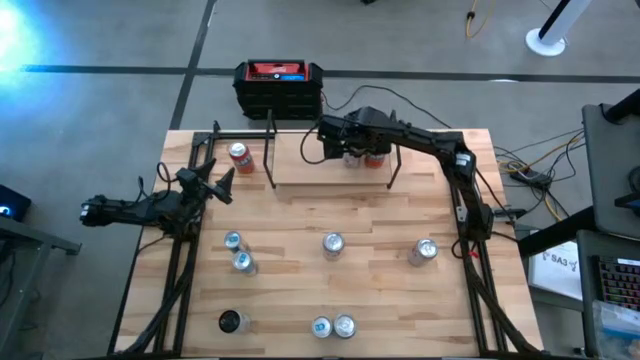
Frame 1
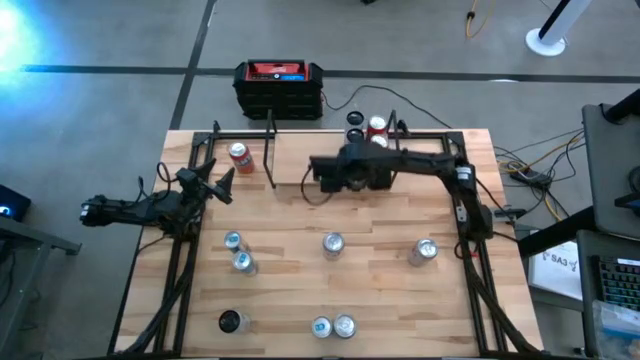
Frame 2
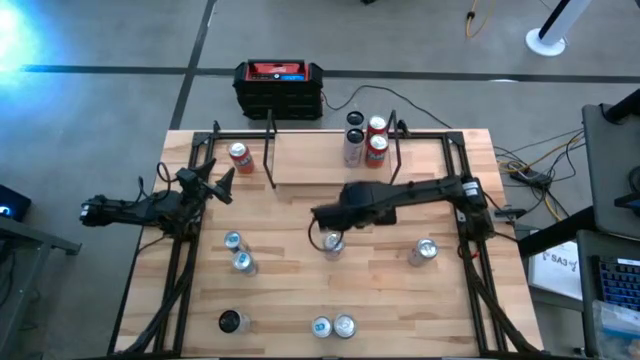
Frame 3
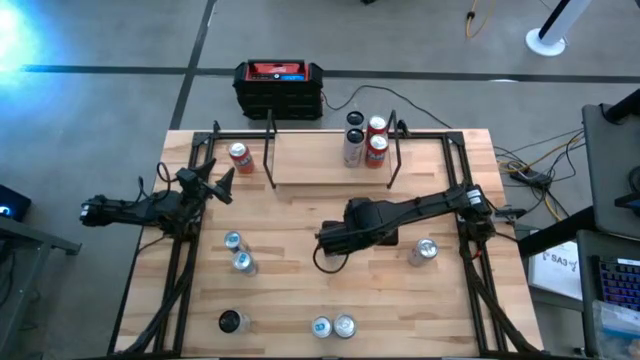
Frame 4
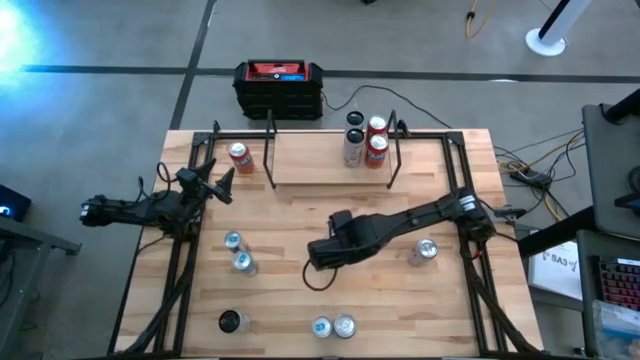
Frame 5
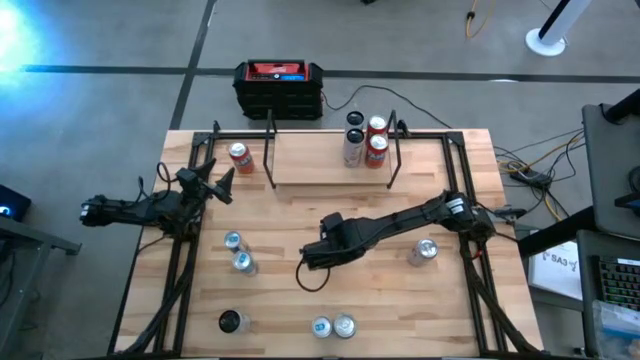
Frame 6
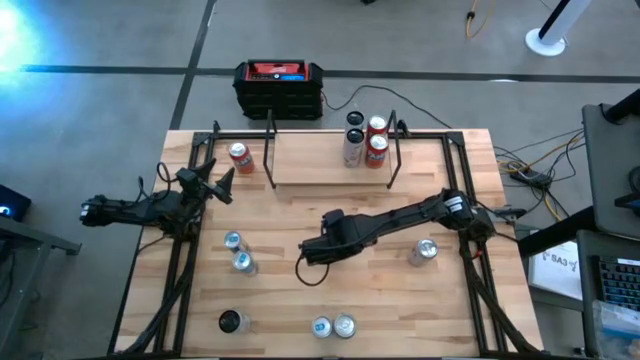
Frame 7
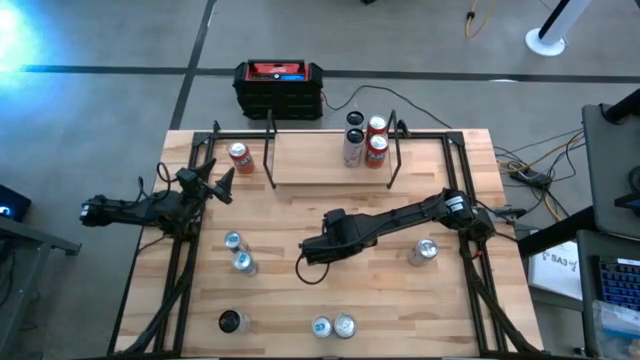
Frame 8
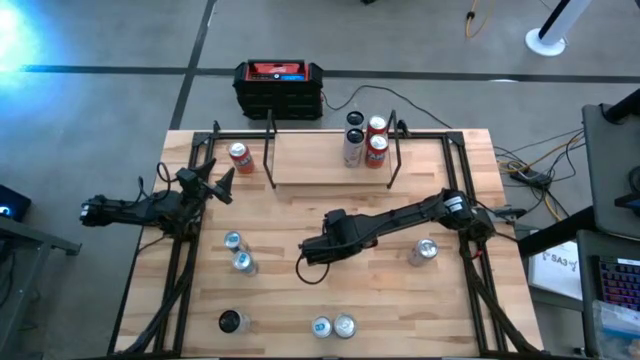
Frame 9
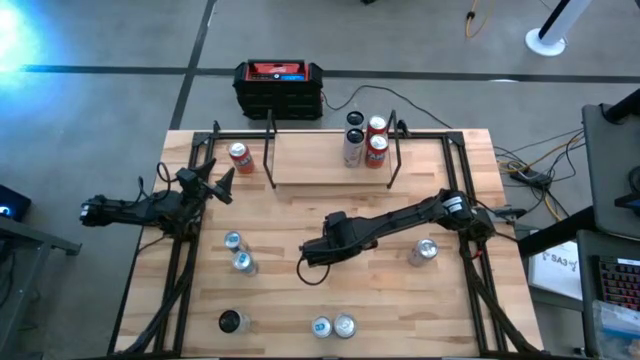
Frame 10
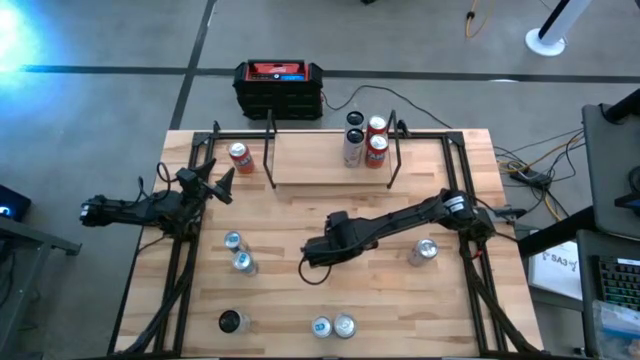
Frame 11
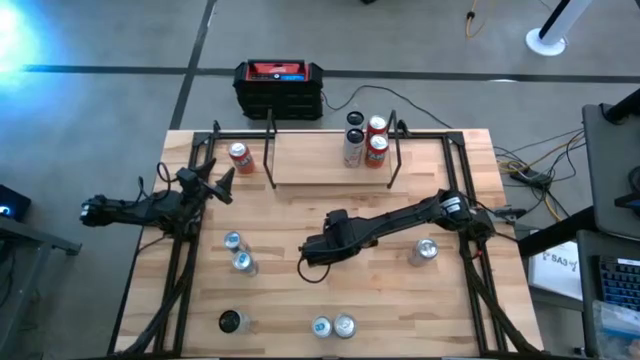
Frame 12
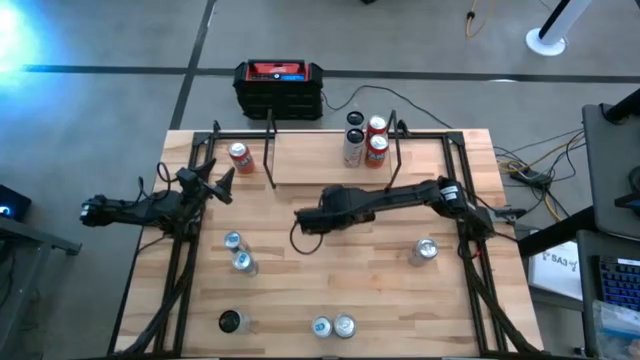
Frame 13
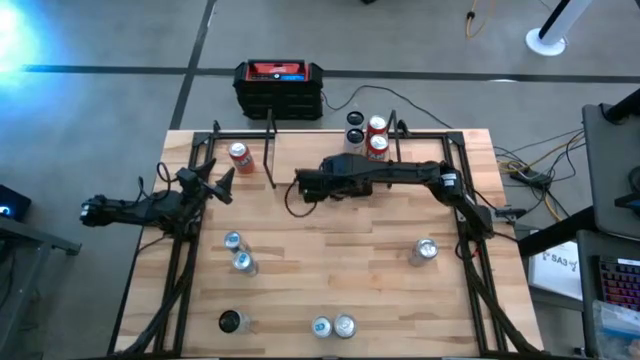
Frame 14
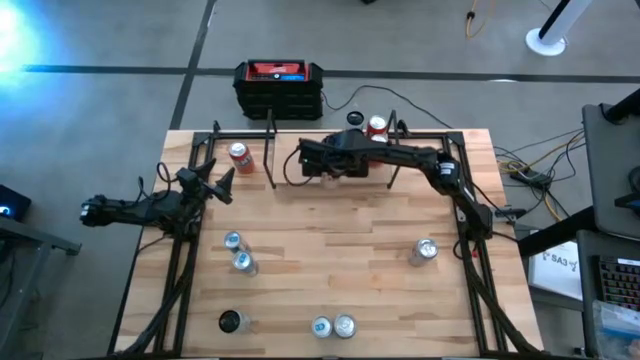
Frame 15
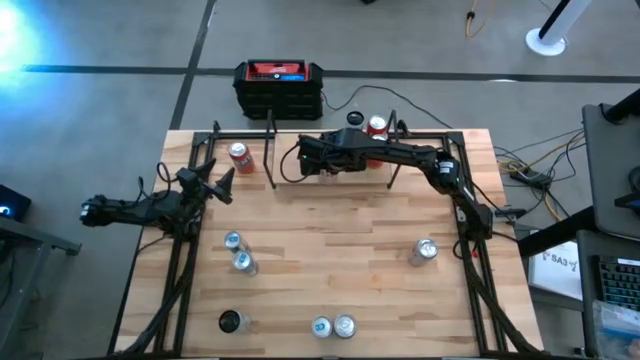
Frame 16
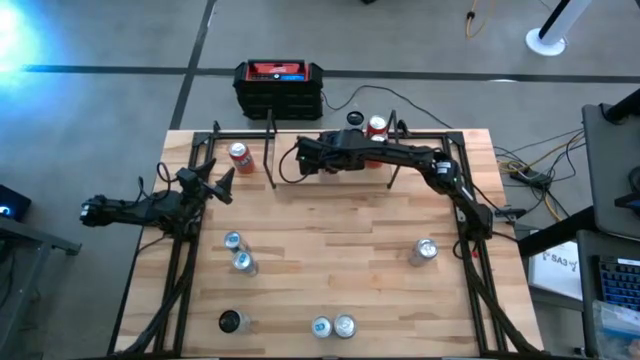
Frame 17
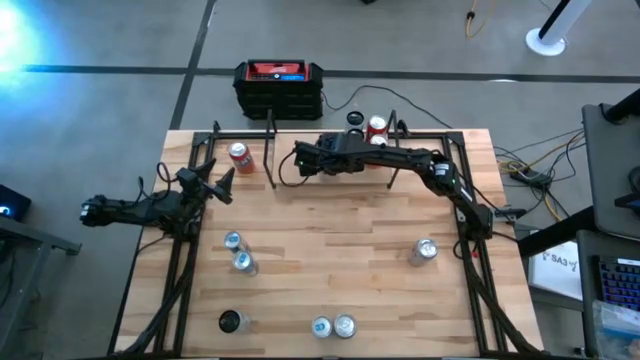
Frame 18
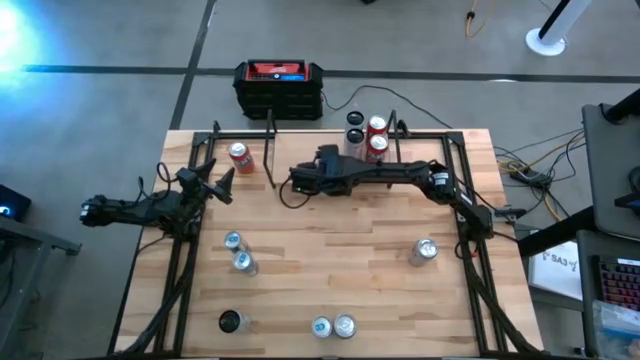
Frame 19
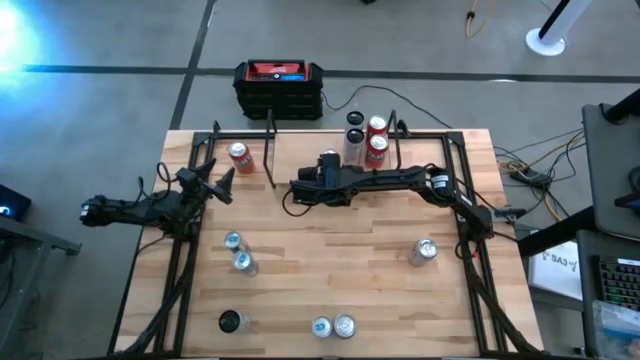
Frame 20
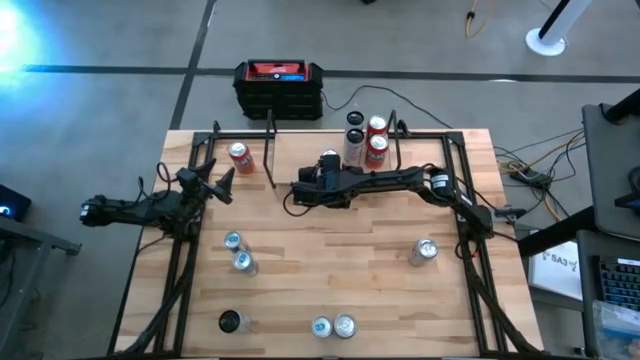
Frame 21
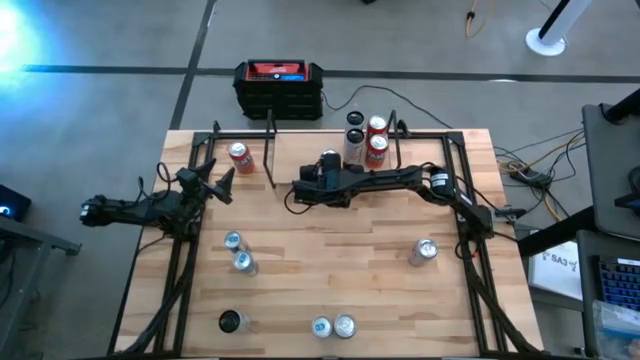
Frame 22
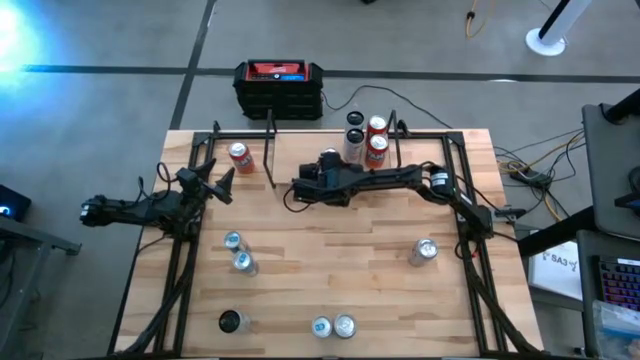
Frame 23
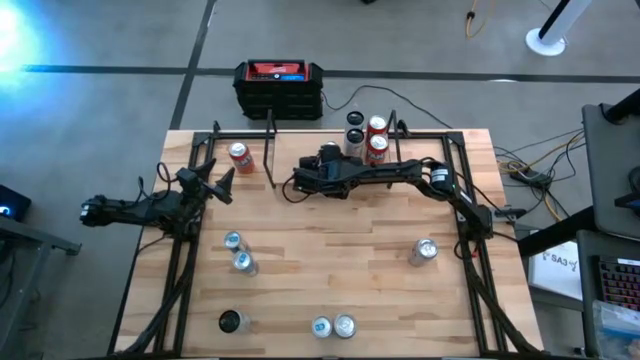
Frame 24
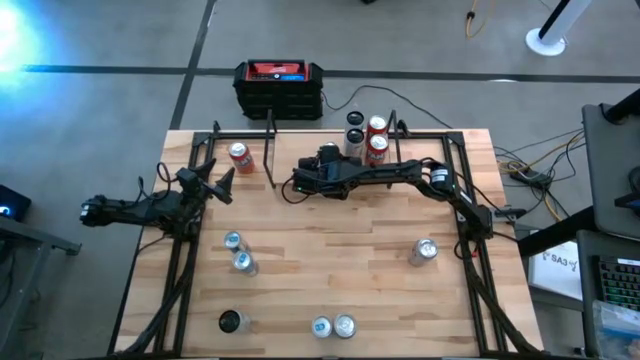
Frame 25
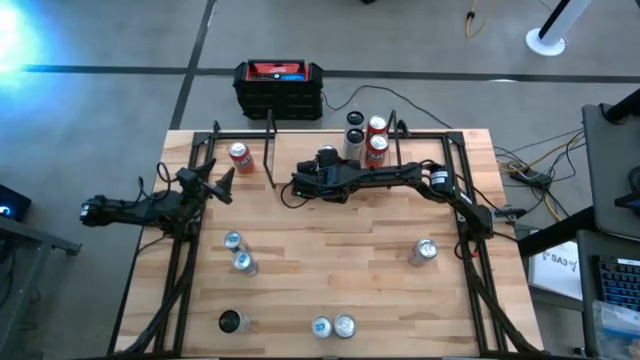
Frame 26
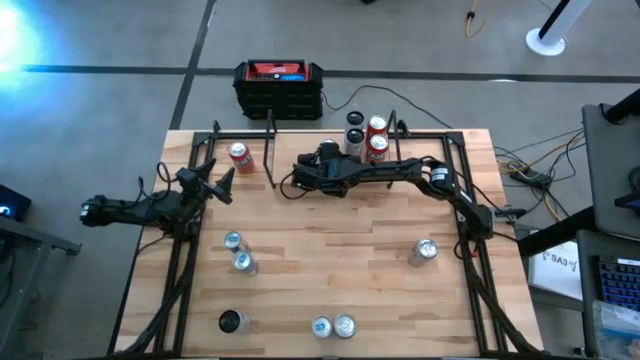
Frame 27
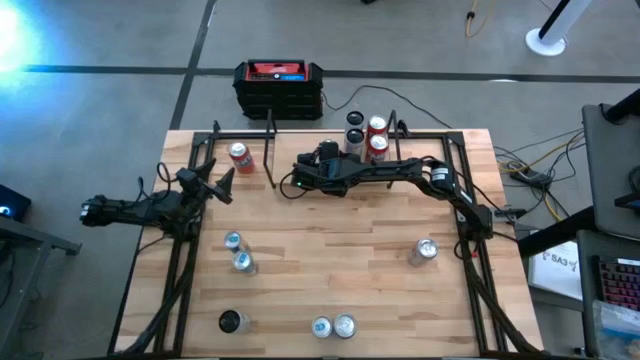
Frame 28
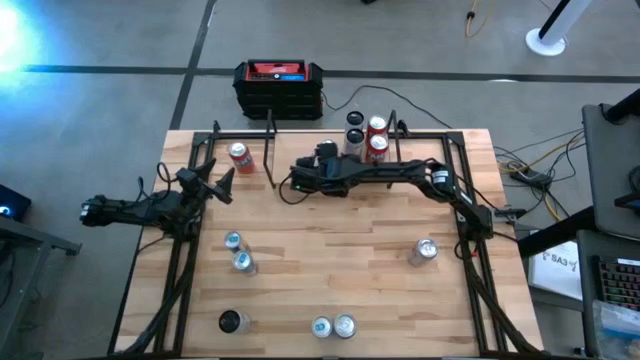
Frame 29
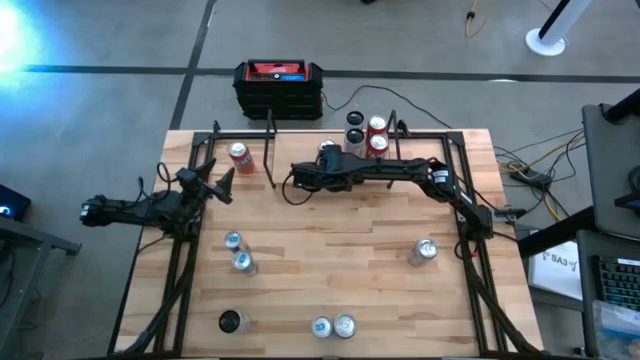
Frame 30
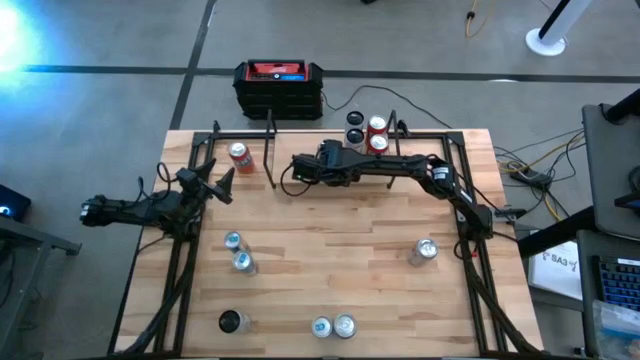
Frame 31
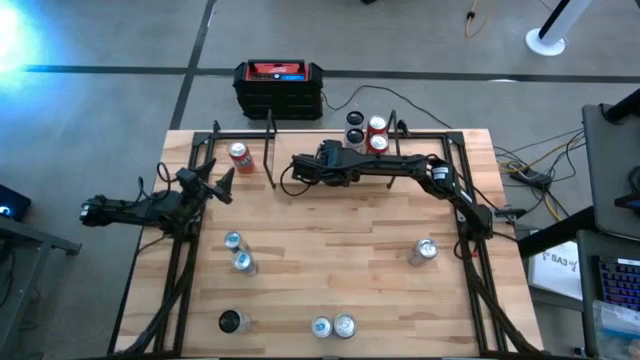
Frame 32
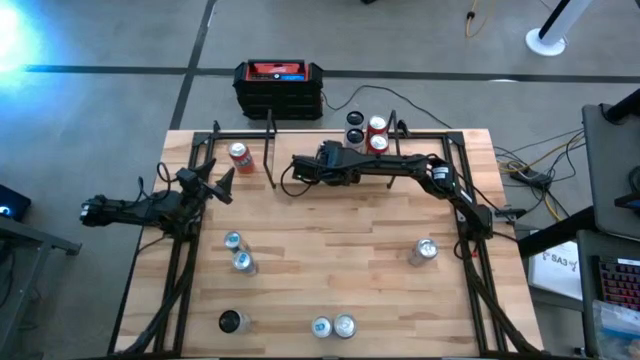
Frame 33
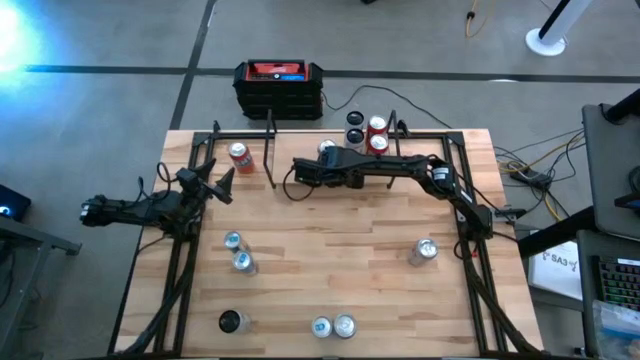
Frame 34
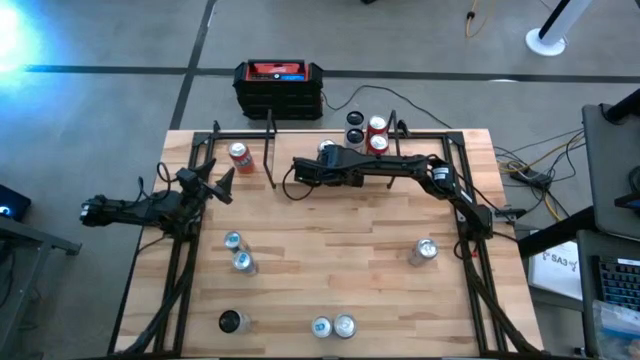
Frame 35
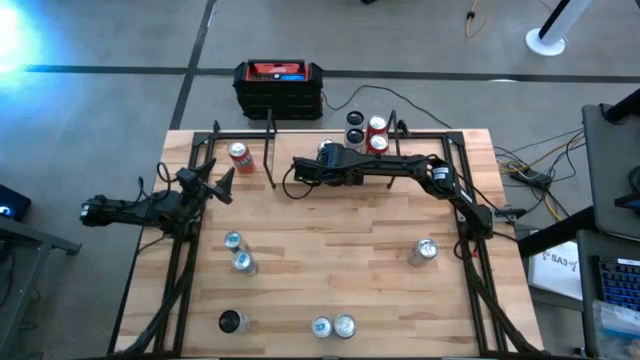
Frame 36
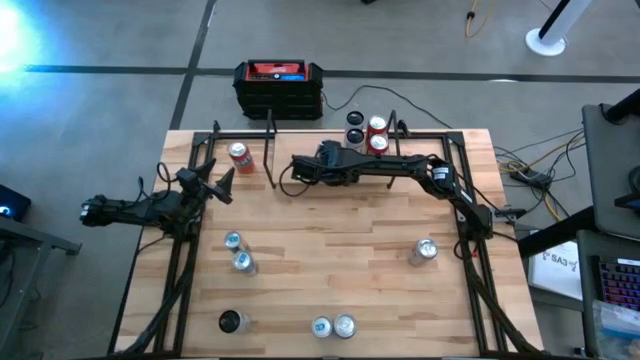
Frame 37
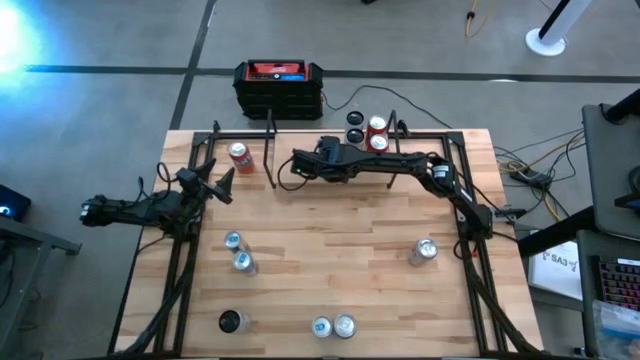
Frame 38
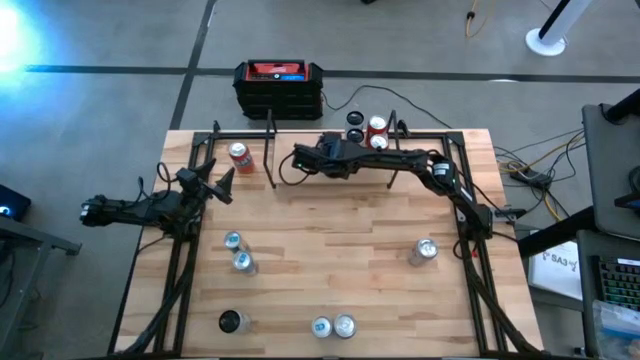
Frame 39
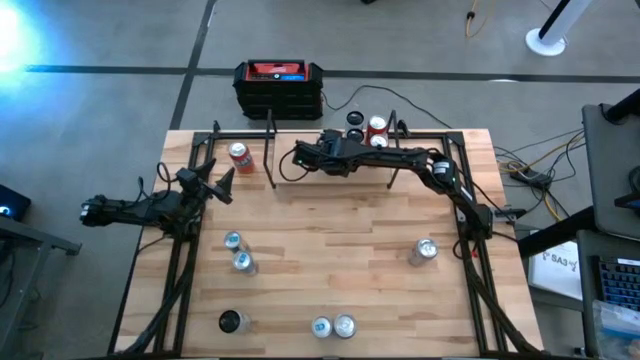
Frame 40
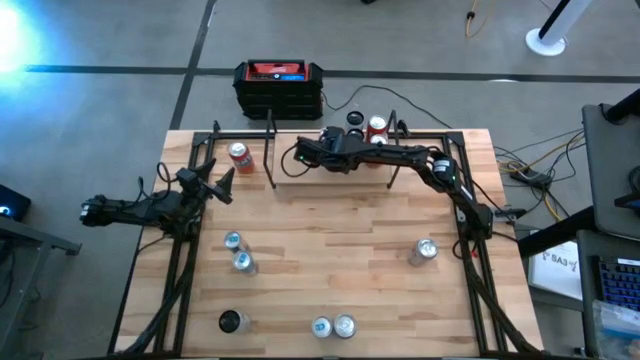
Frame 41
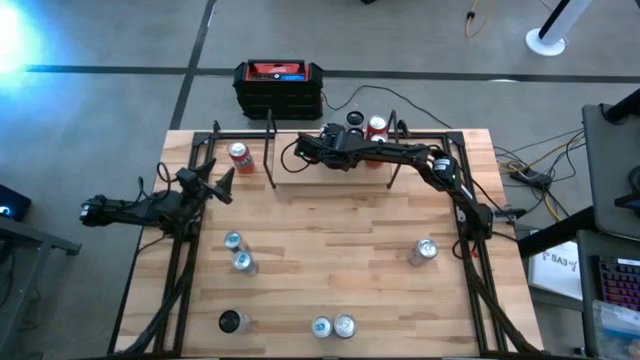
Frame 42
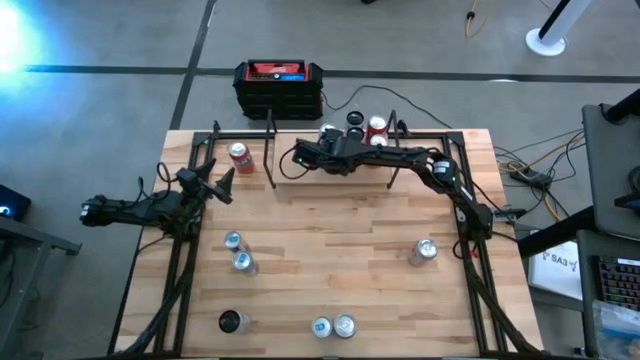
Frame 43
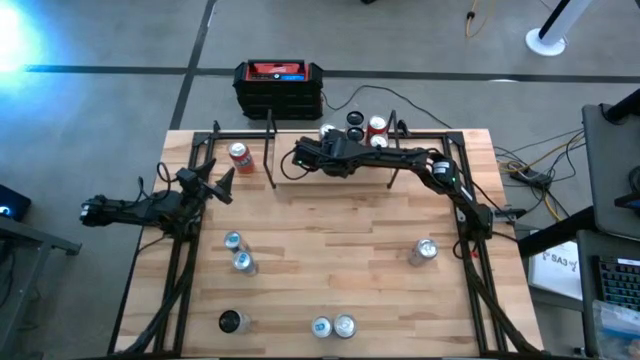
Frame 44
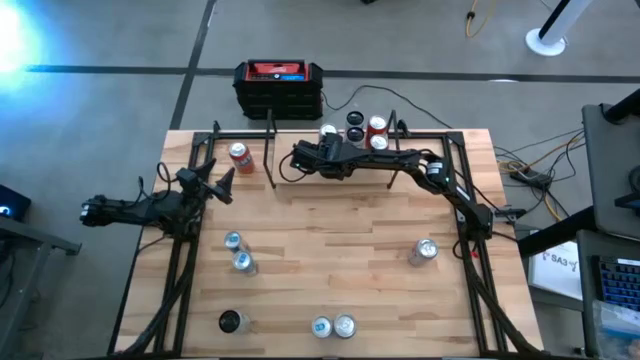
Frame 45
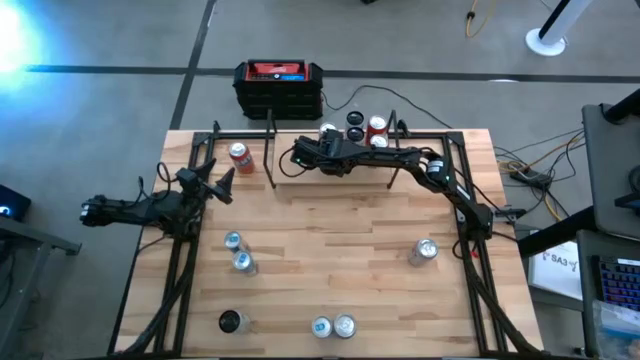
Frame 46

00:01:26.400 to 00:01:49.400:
Task: Place canned beverage on shelf
Put the top left silver soda can on the shelf
